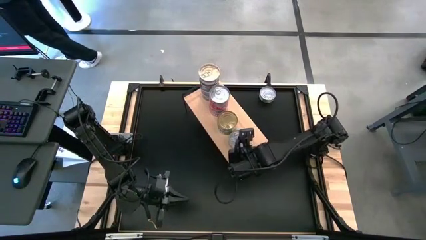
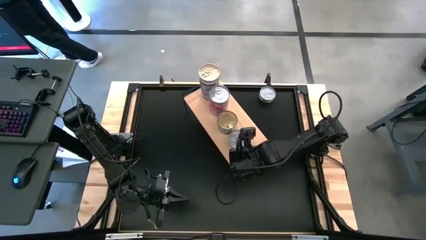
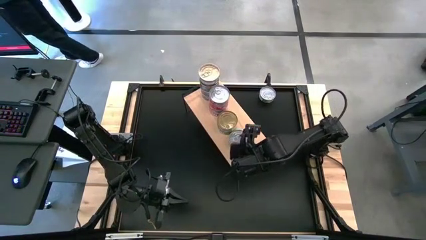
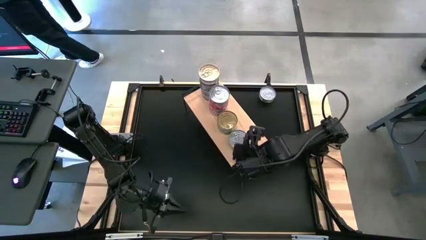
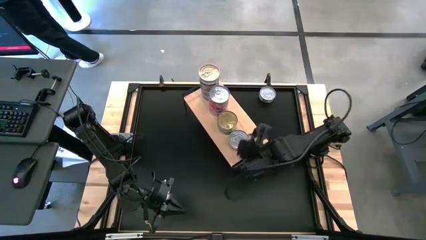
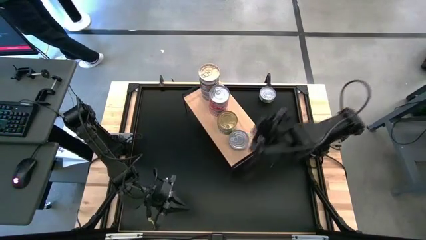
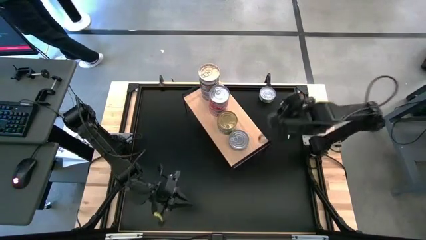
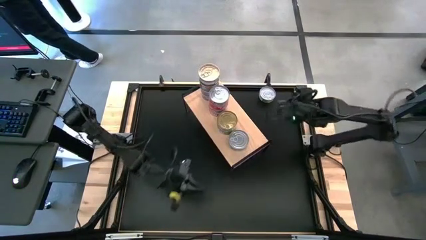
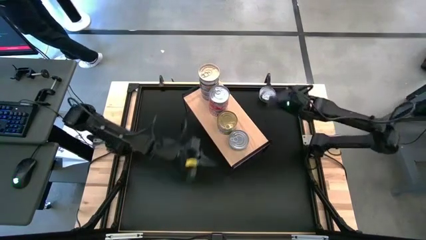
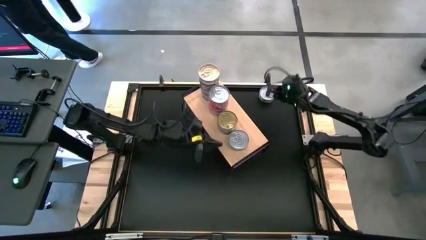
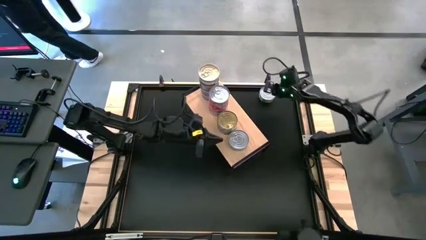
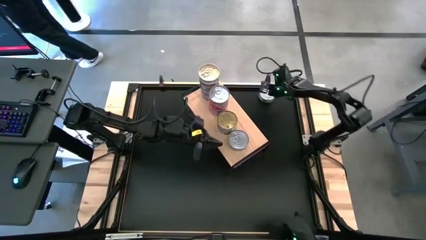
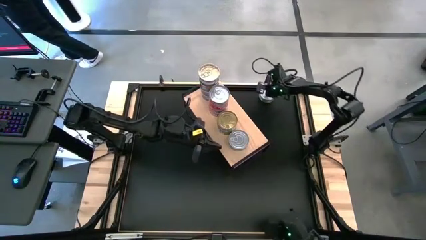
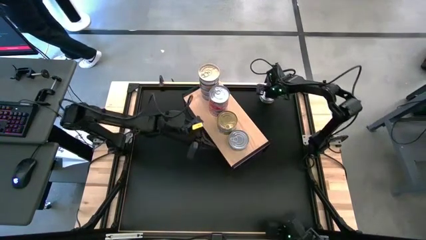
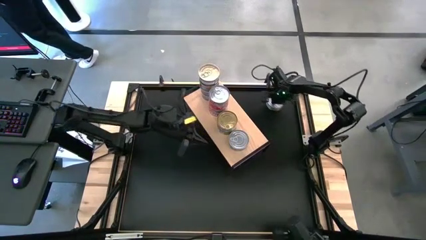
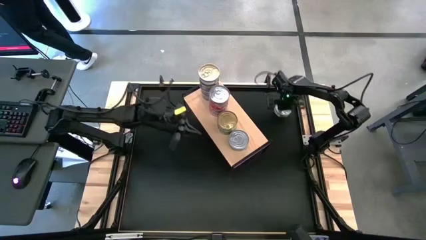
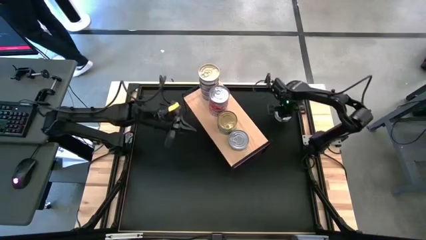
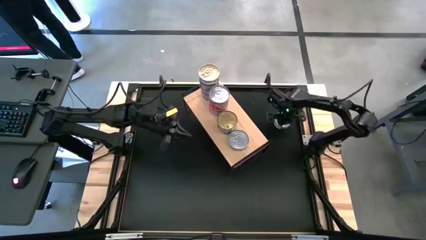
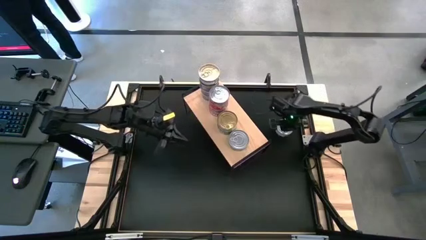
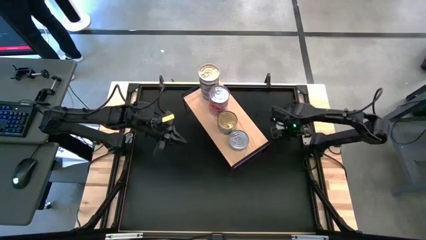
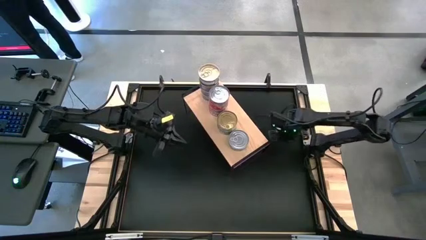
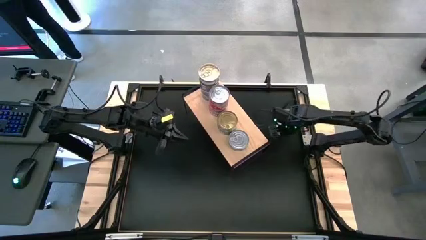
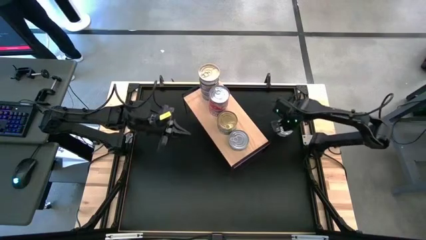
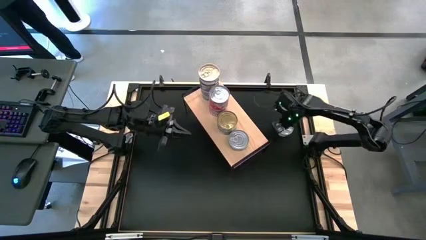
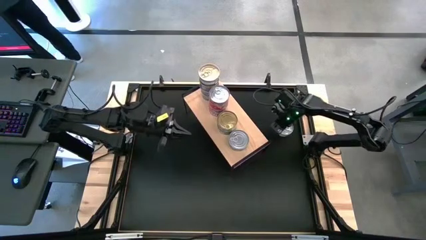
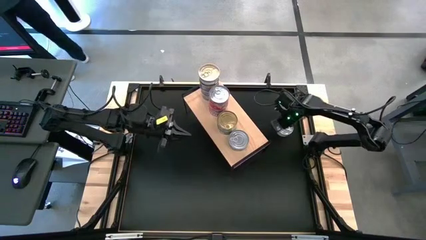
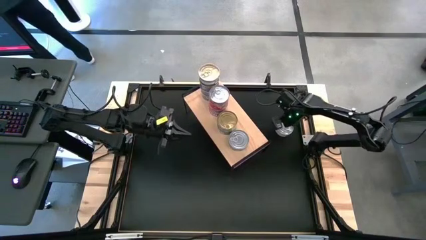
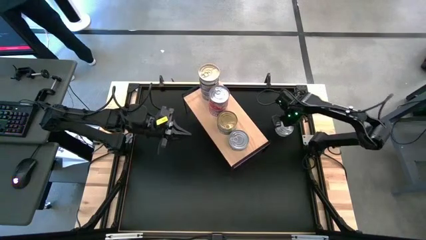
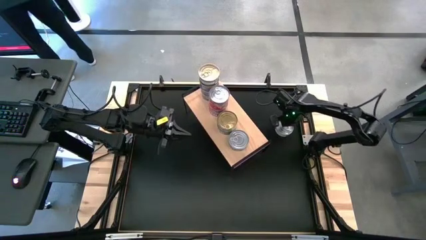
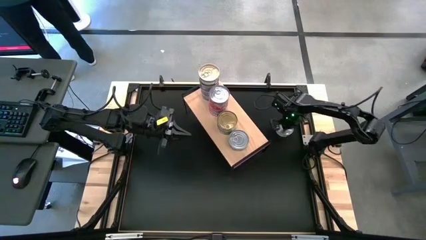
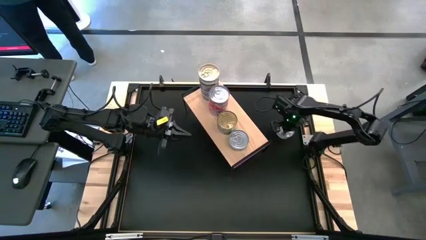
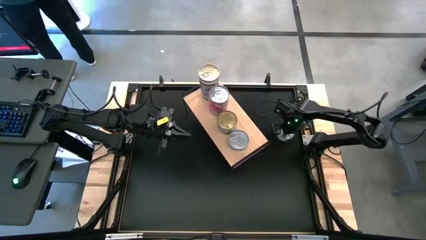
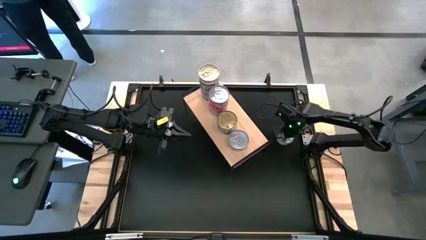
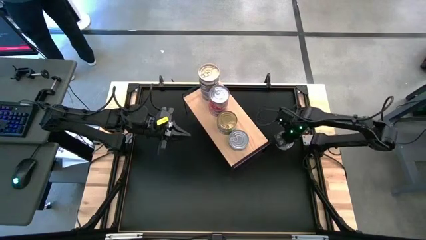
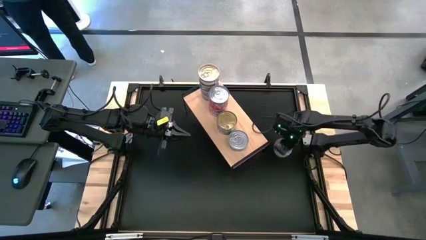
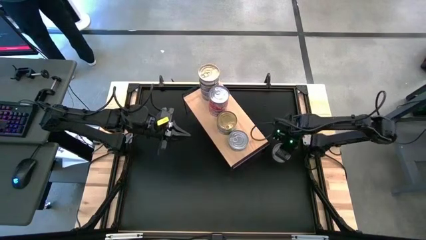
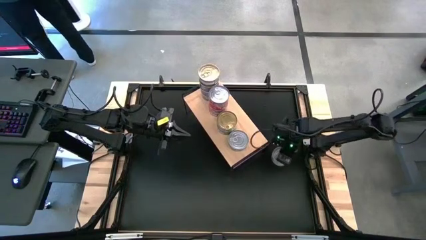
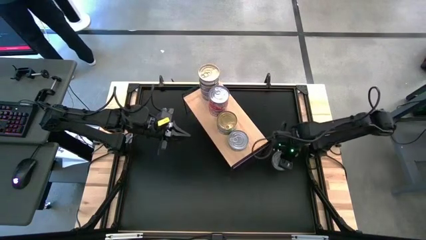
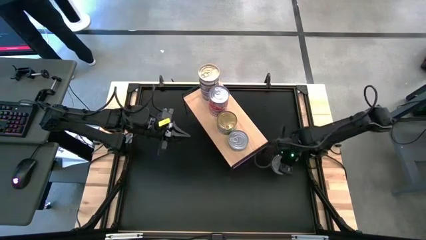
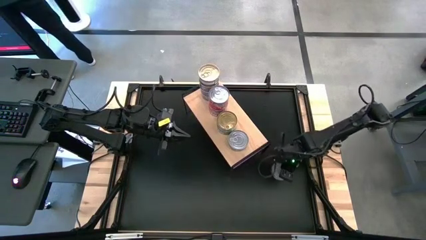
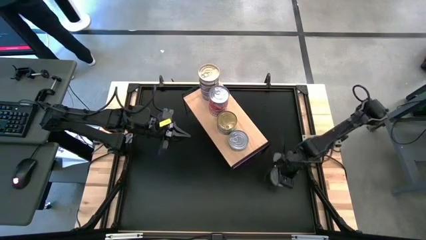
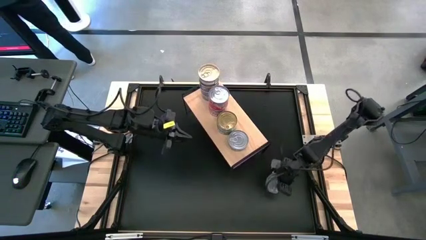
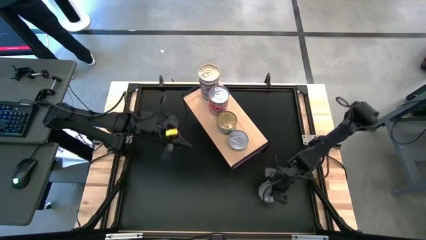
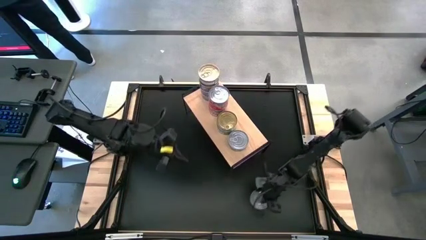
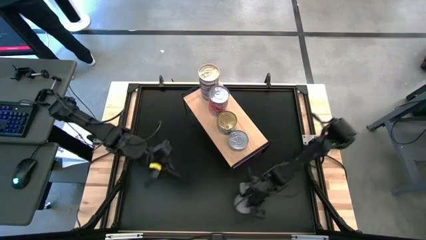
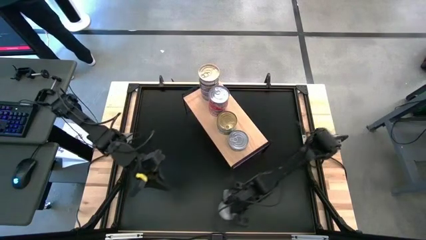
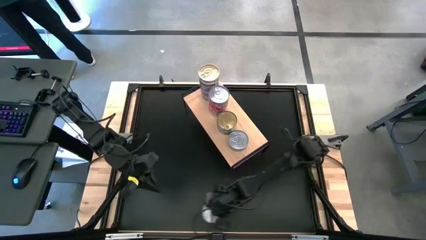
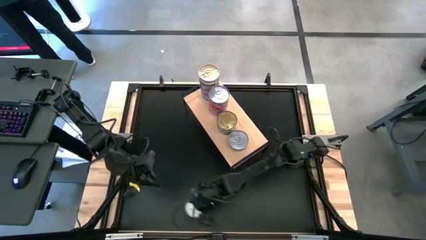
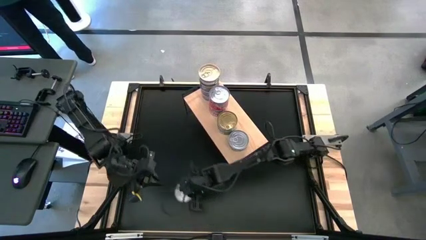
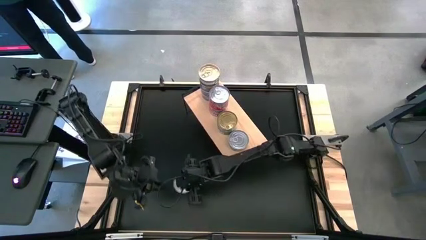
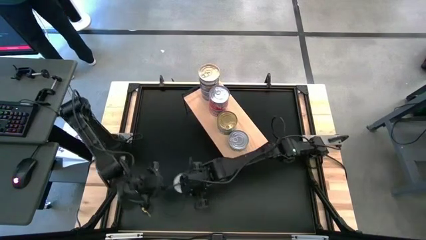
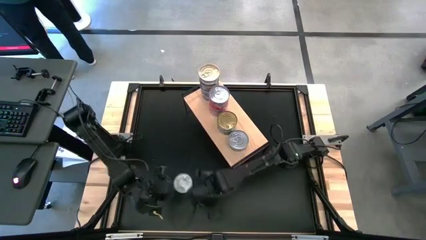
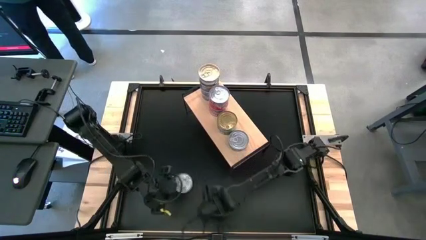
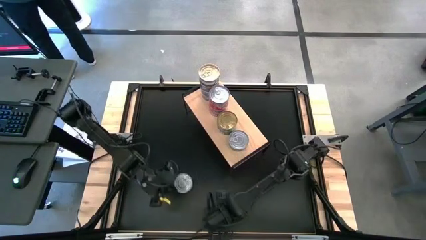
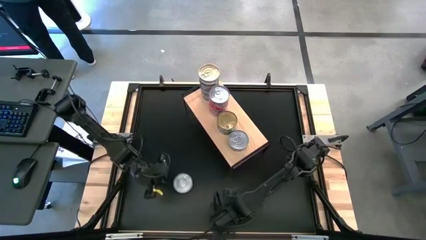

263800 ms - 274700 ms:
Task: Stack canned seafood by type on shelf
Stack the green tuna can on top of the green tuna can on the shelf
